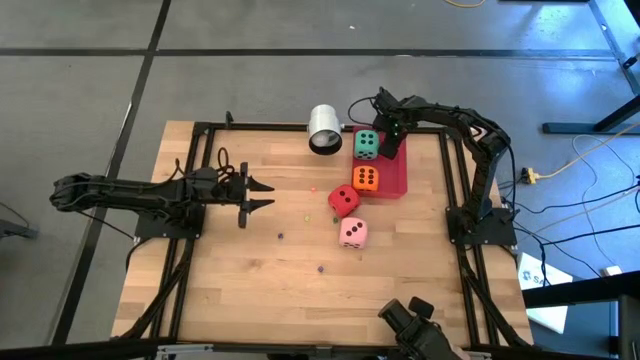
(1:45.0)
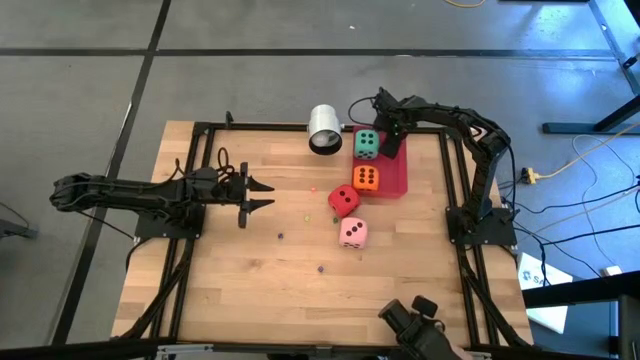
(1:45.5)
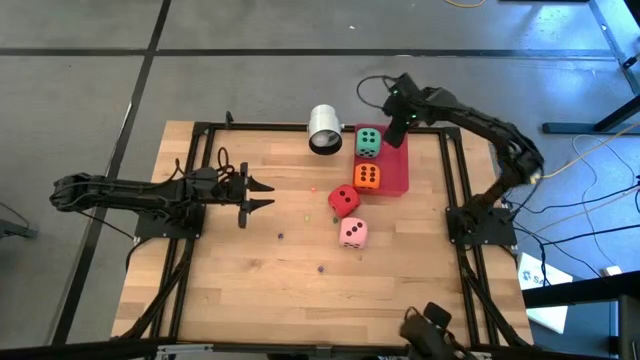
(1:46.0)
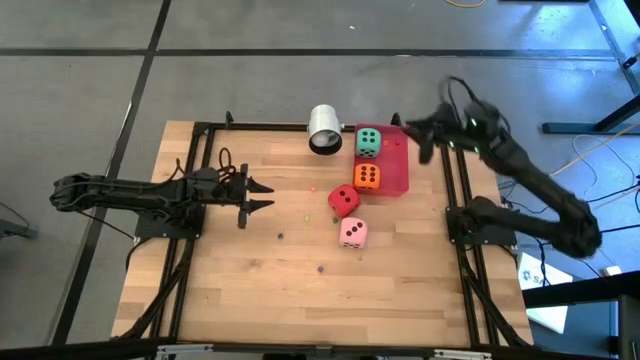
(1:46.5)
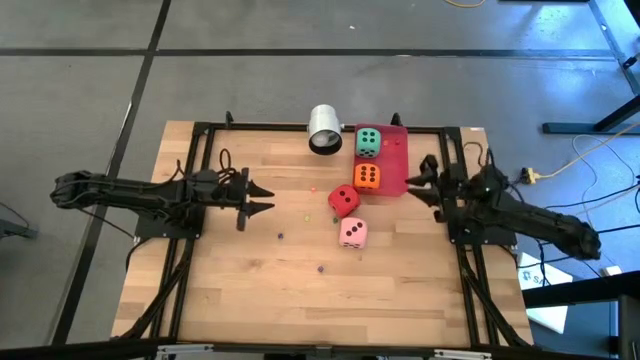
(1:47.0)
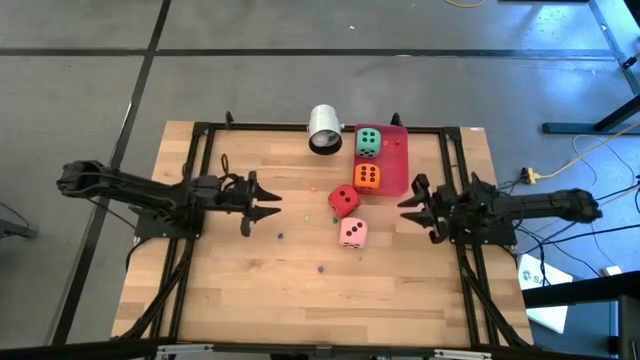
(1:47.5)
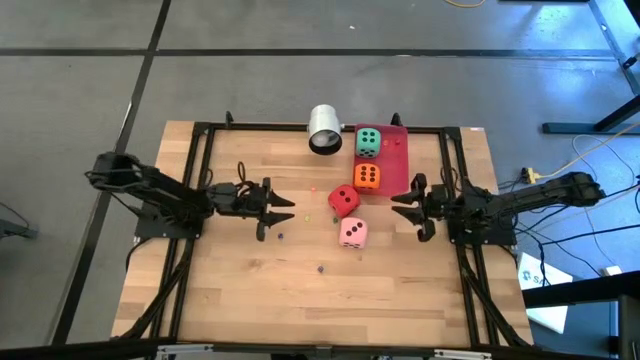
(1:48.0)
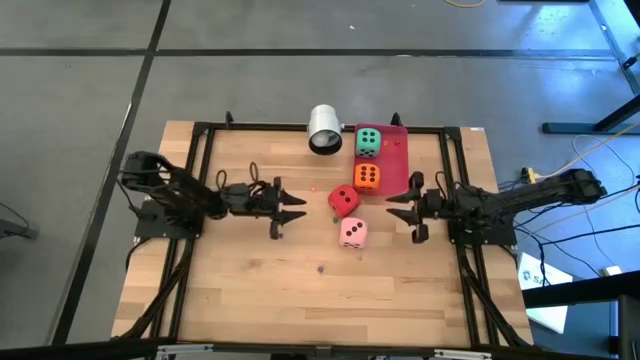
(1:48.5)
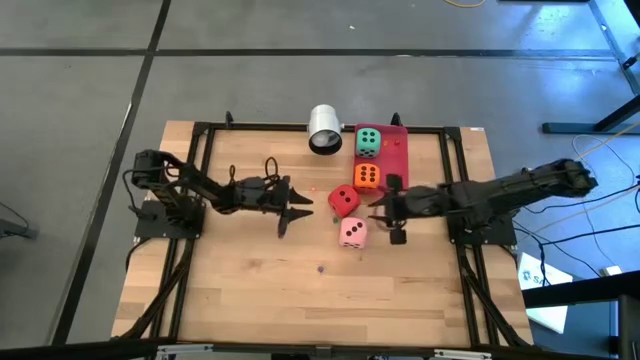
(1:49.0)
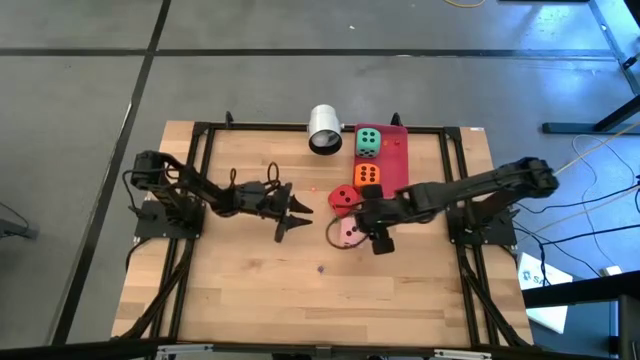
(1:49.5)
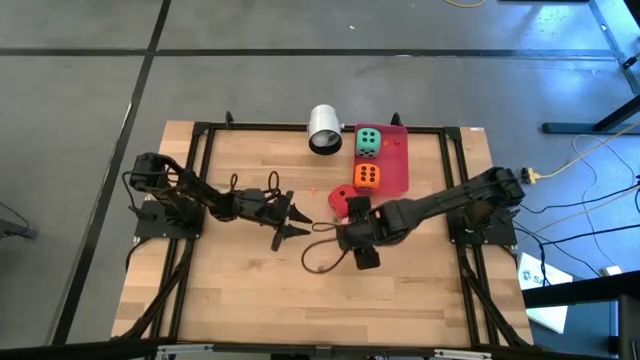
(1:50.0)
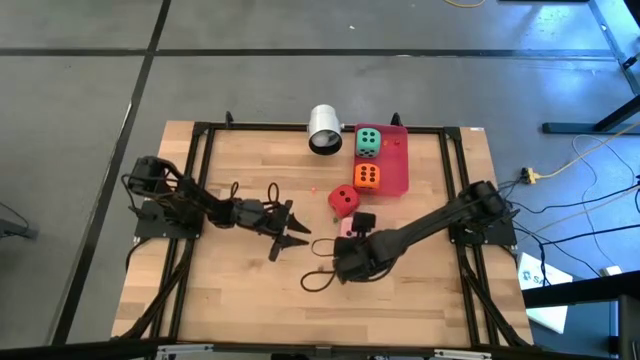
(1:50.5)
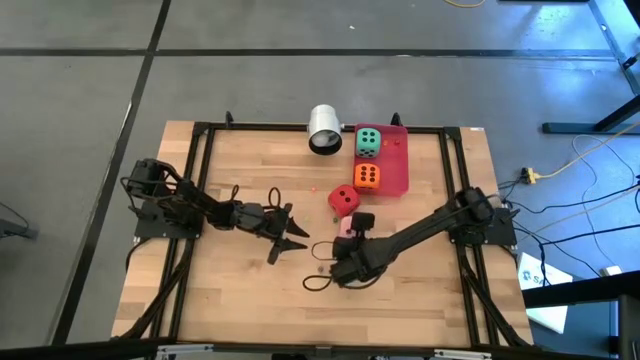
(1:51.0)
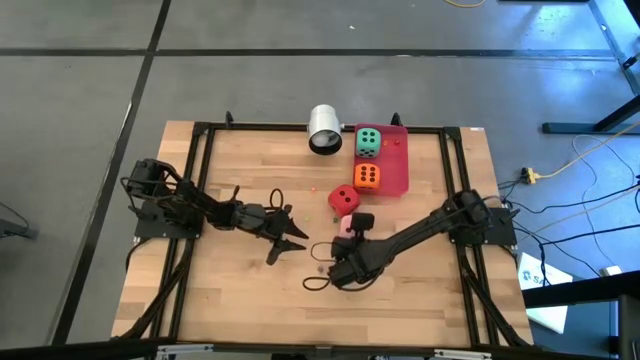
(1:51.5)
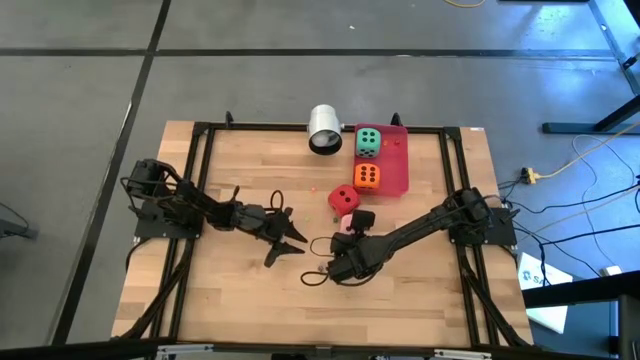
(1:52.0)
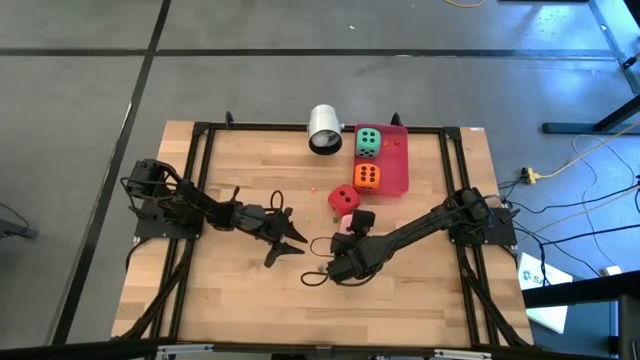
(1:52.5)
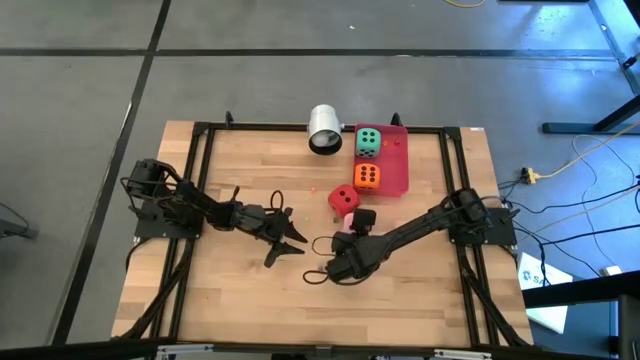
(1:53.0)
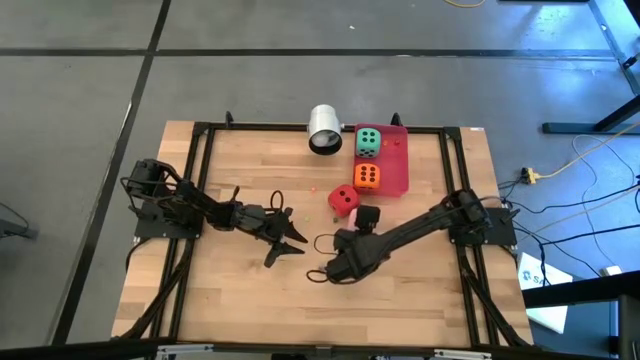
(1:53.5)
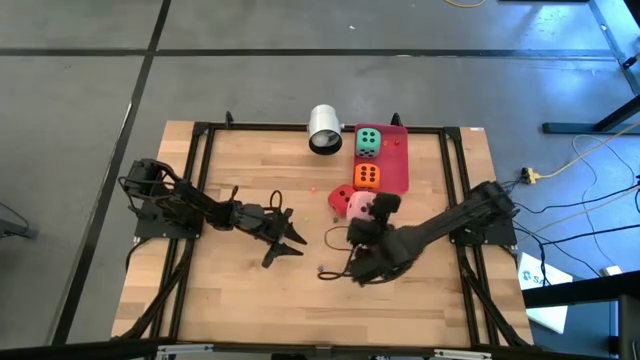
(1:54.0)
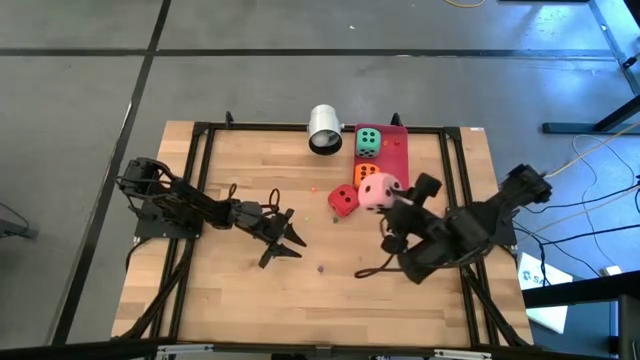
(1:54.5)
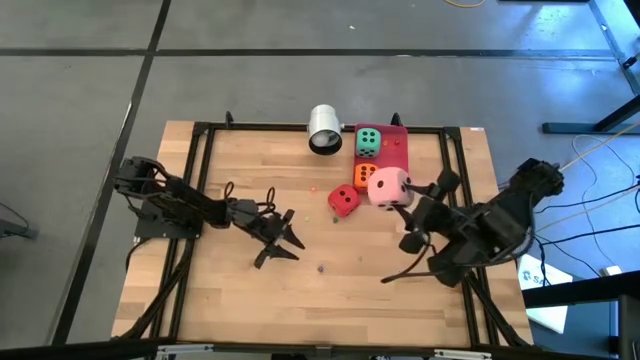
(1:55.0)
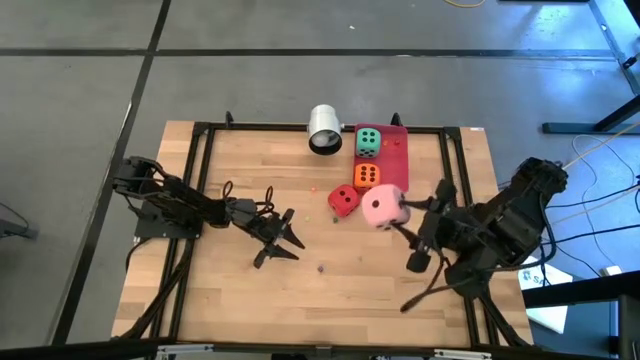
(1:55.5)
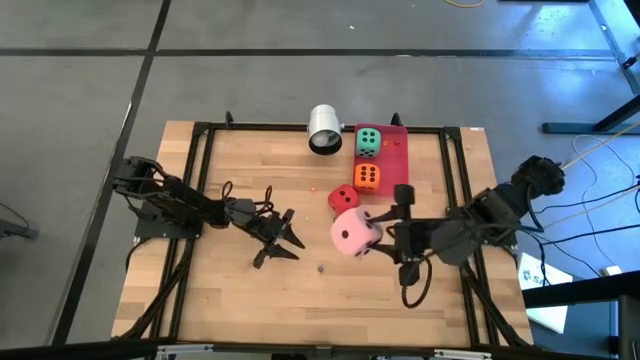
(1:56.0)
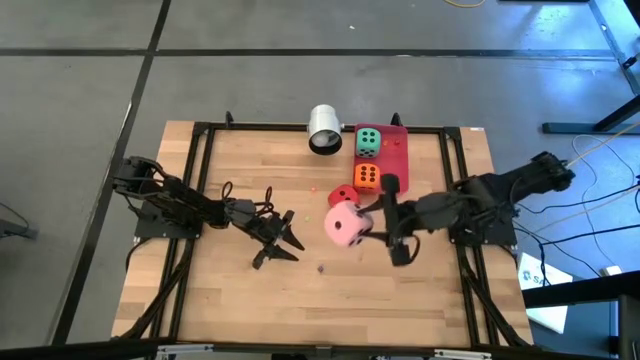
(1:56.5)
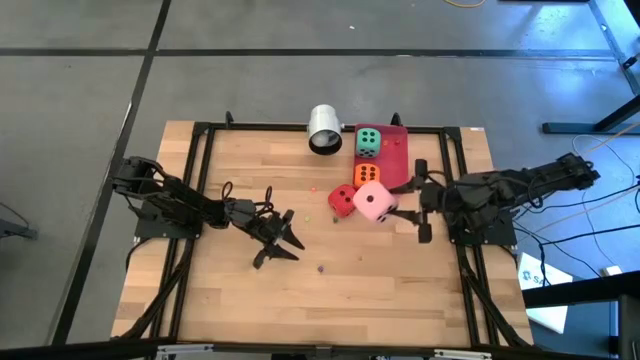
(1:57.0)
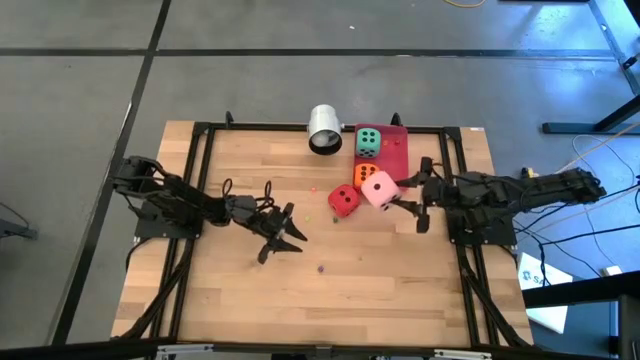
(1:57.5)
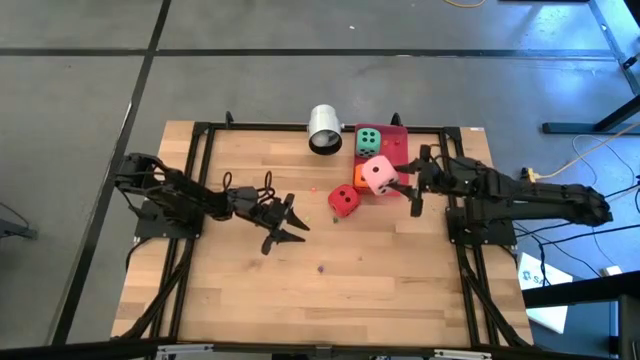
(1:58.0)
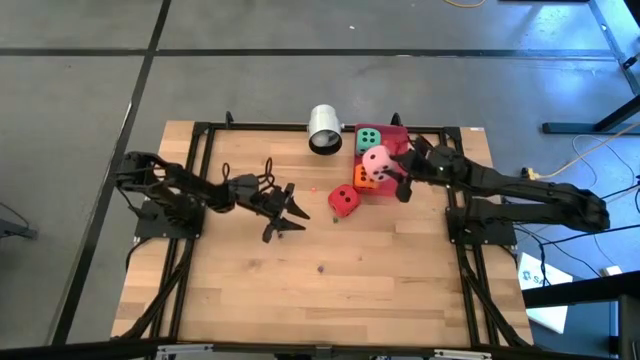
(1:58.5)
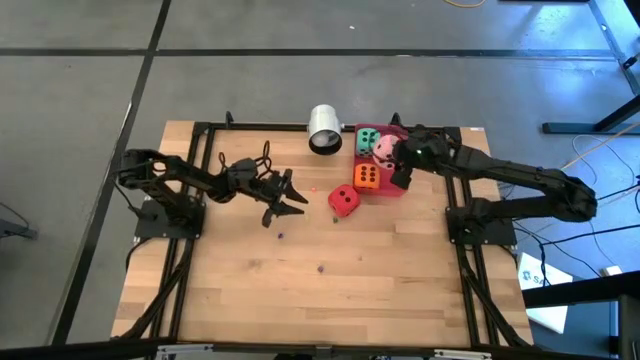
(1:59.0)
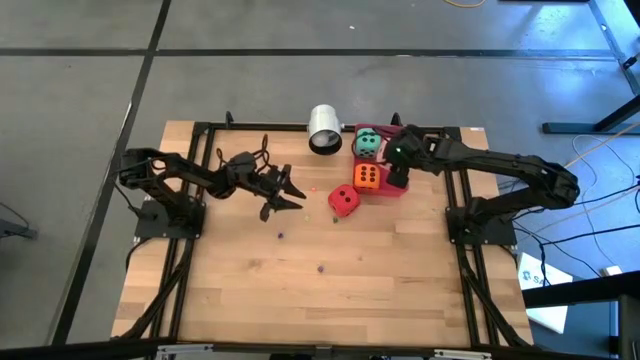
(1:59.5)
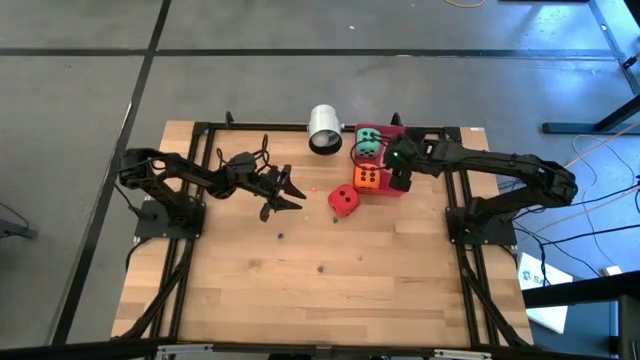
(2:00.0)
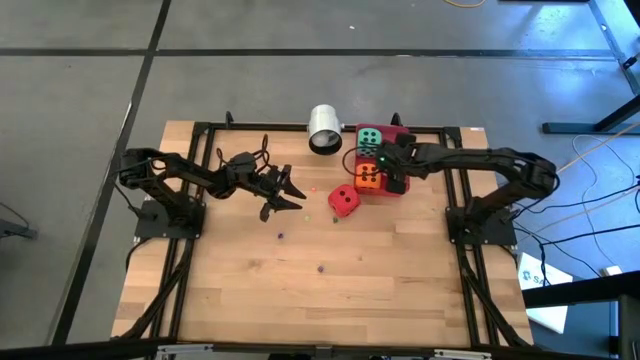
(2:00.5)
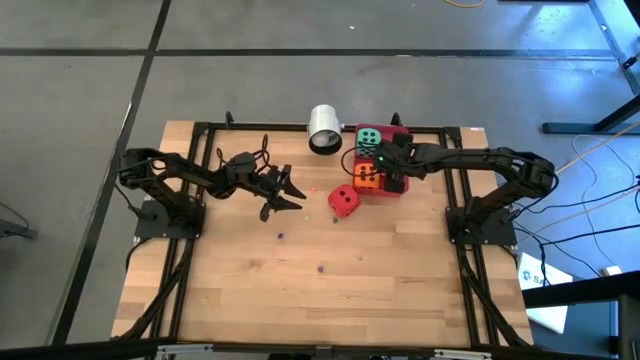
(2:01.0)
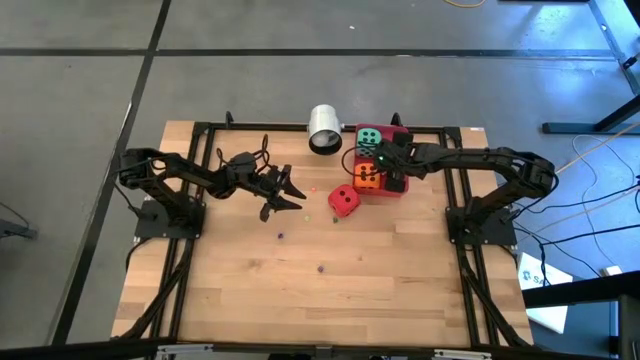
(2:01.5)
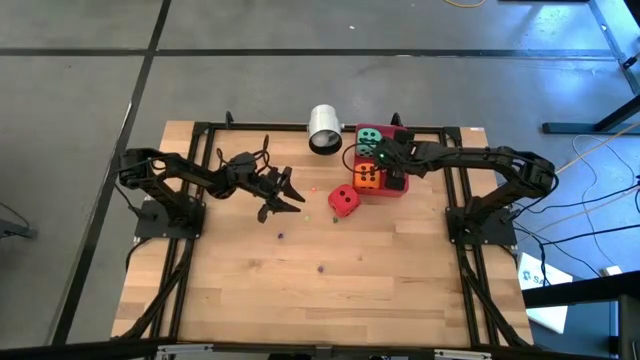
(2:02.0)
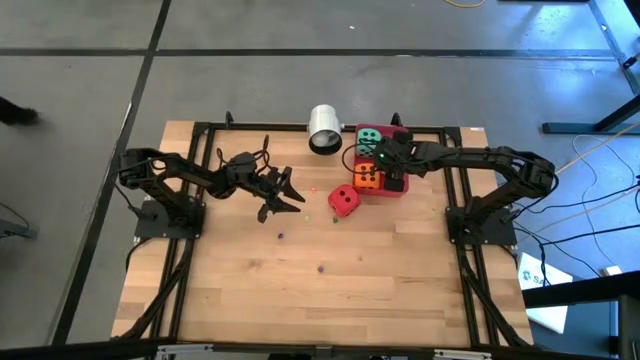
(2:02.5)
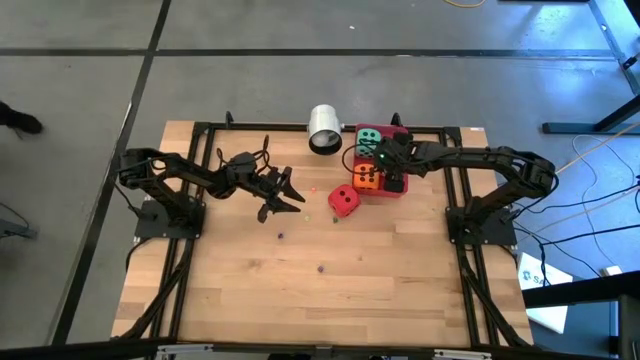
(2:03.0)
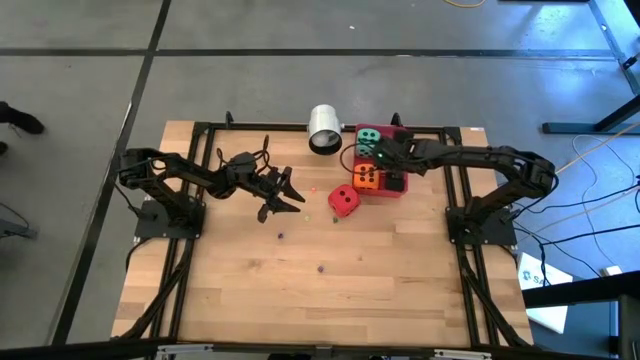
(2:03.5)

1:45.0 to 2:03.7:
Task: Pick & Place Dice
Put the big pink dice into the red bin

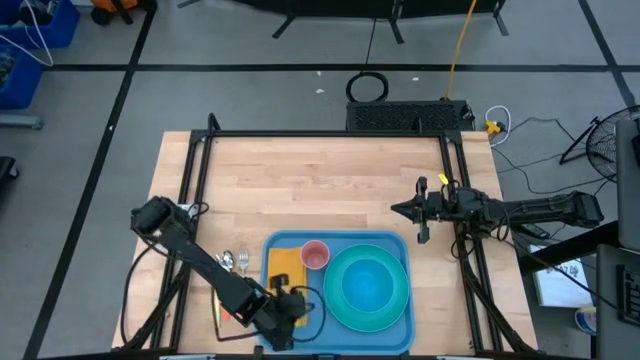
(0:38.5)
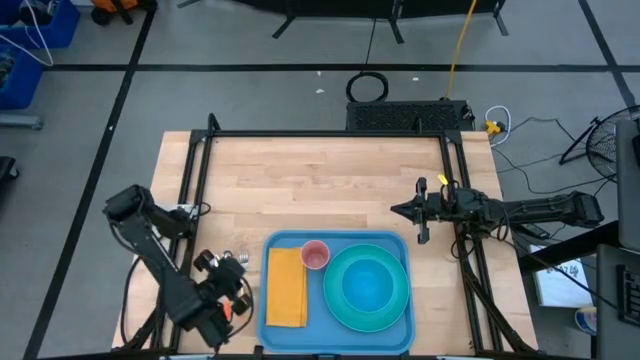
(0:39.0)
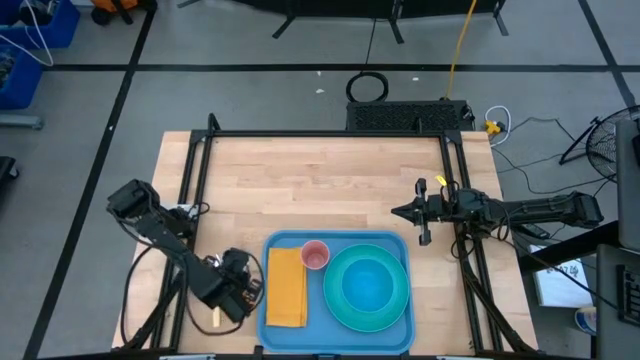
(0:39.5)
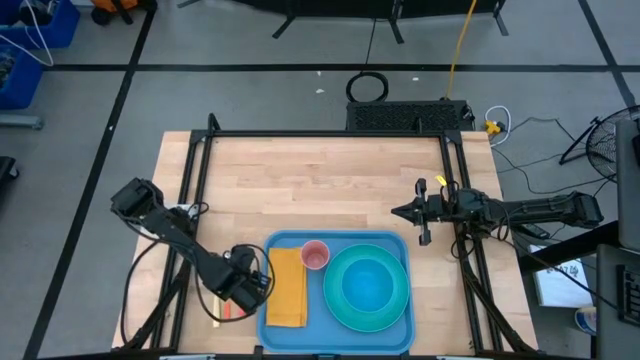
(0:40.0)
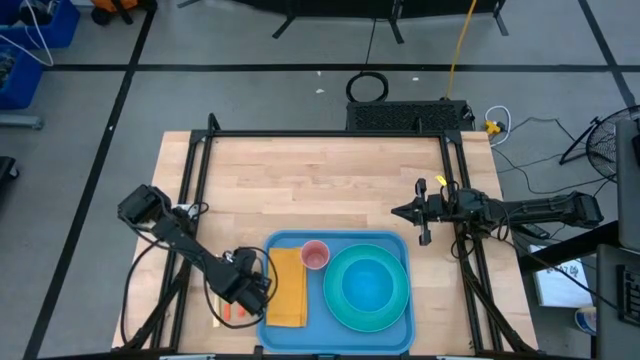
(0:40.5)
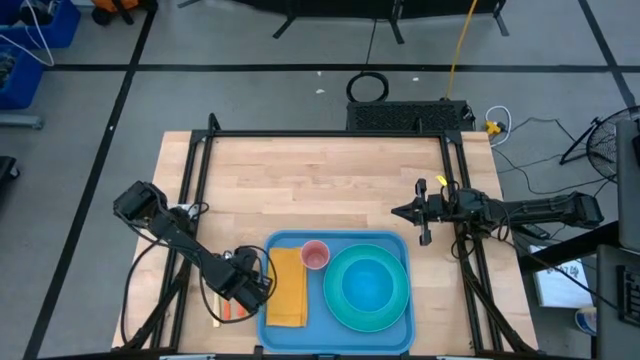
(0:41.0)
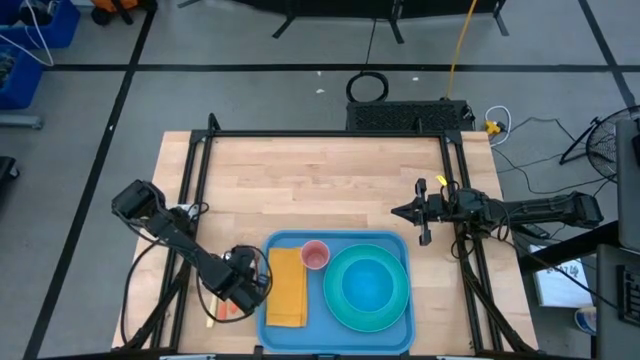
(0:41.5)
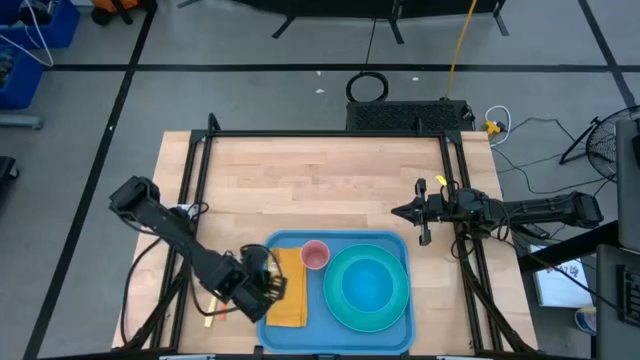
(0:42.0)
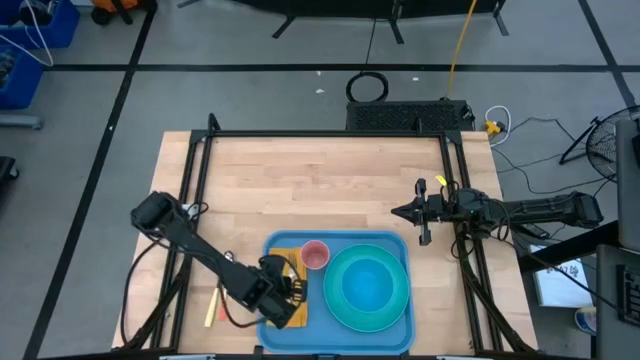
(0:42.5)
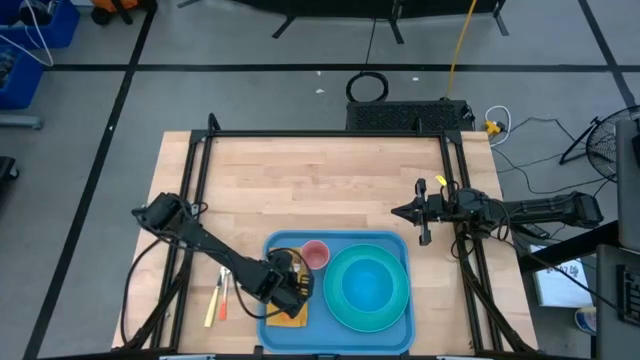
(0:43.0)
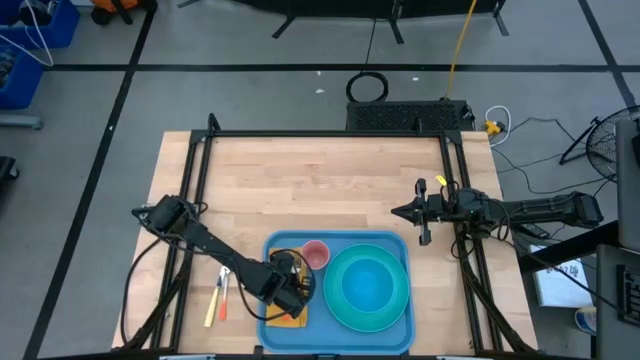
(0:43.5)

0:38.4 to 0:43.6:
Task: Set up tray
Put the orange fork on top of the yellow table napkin
